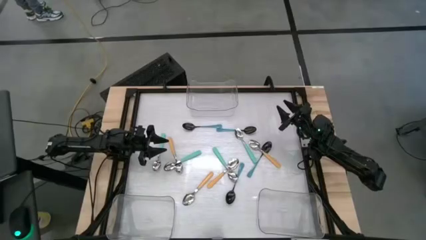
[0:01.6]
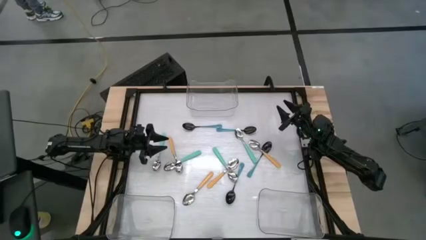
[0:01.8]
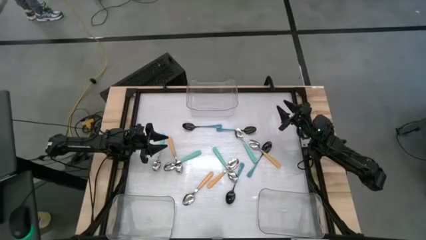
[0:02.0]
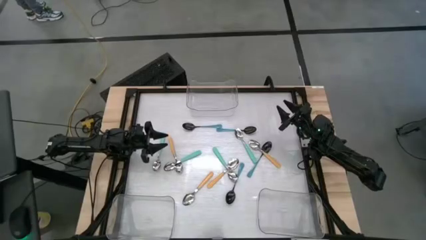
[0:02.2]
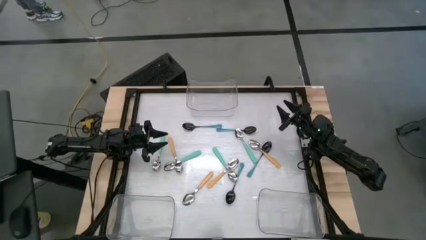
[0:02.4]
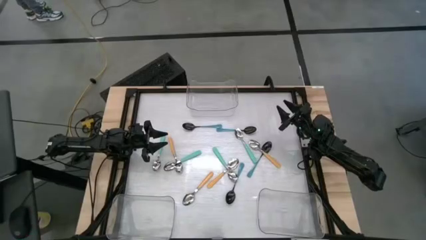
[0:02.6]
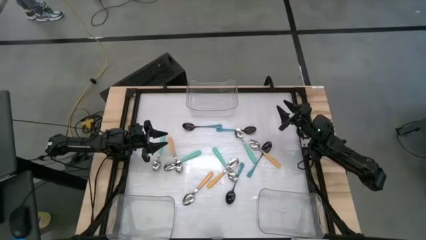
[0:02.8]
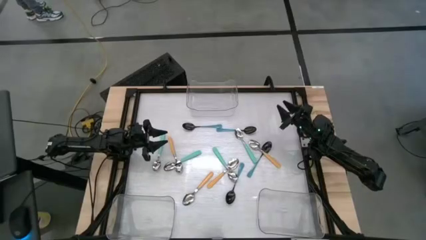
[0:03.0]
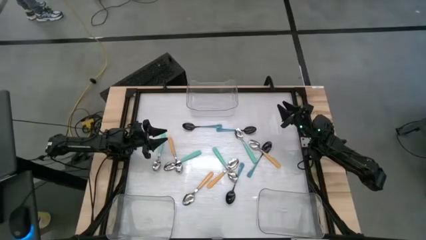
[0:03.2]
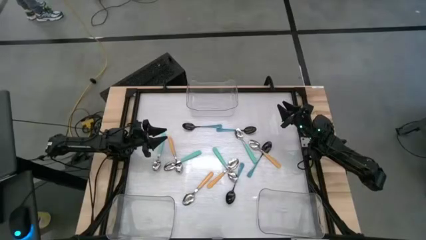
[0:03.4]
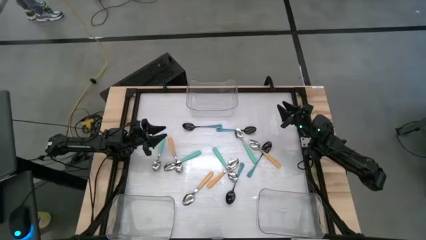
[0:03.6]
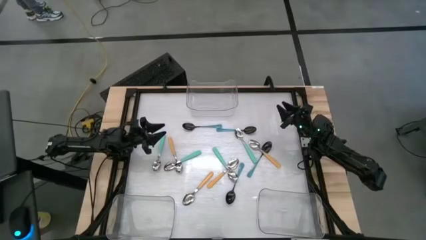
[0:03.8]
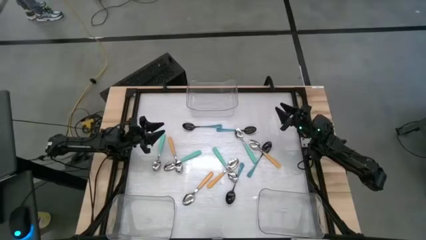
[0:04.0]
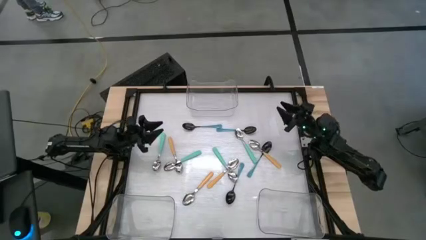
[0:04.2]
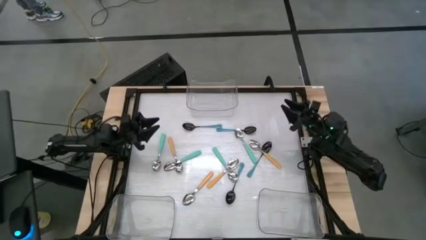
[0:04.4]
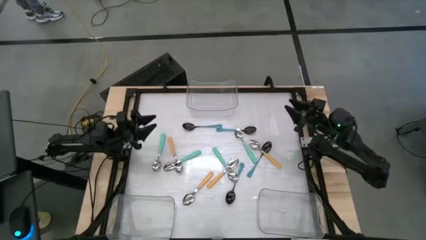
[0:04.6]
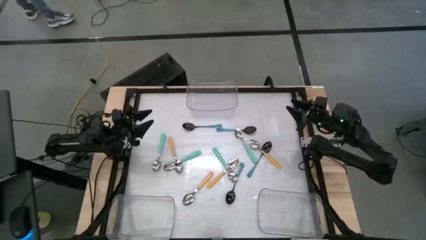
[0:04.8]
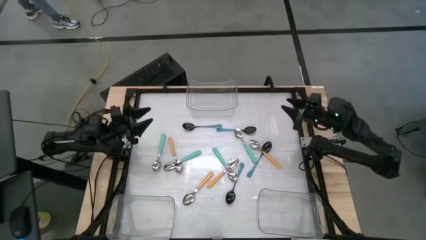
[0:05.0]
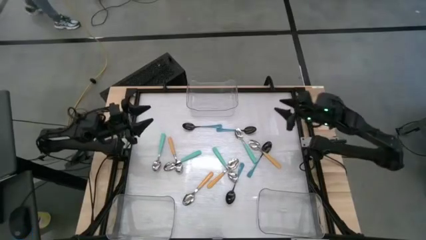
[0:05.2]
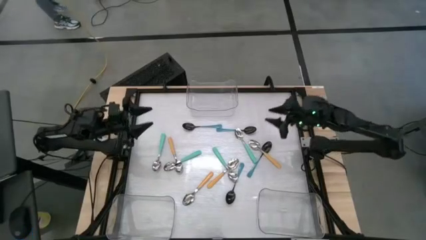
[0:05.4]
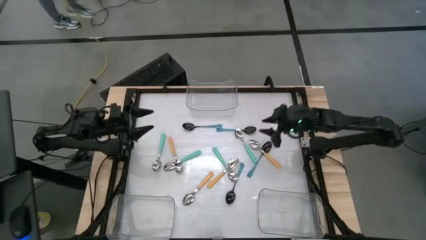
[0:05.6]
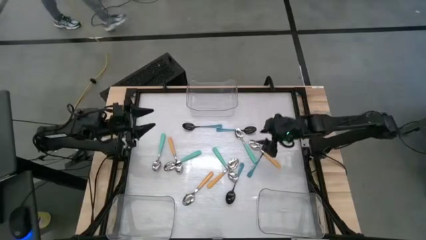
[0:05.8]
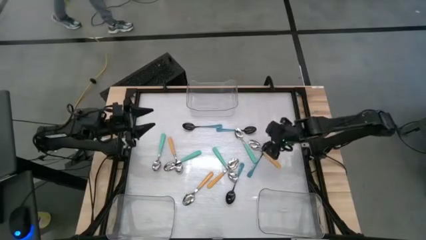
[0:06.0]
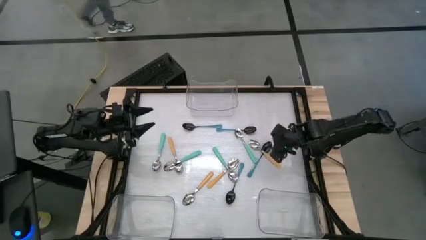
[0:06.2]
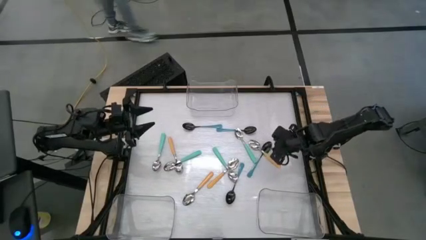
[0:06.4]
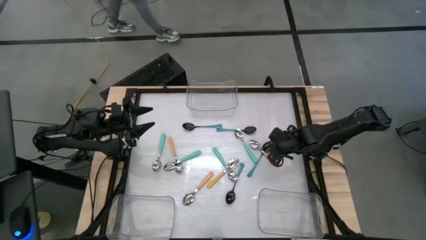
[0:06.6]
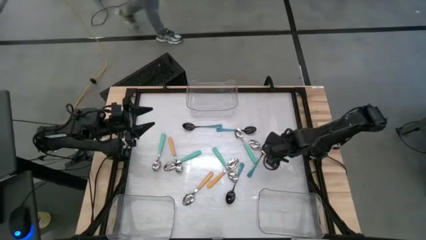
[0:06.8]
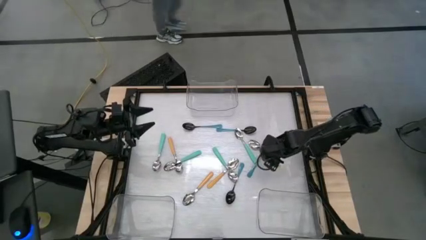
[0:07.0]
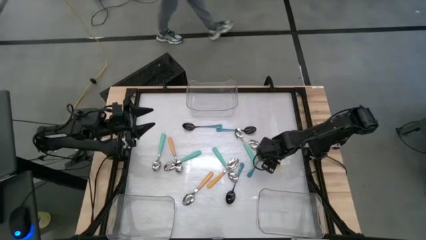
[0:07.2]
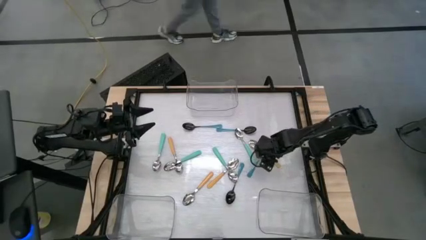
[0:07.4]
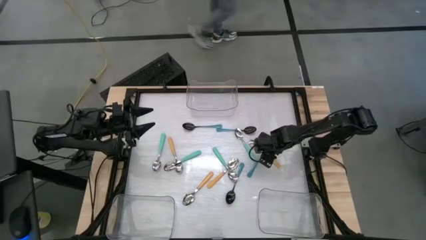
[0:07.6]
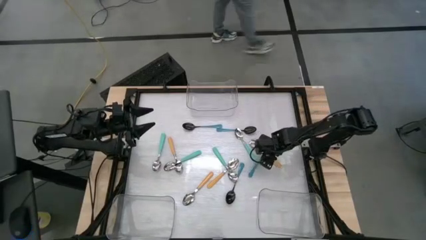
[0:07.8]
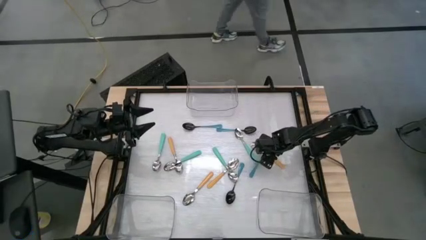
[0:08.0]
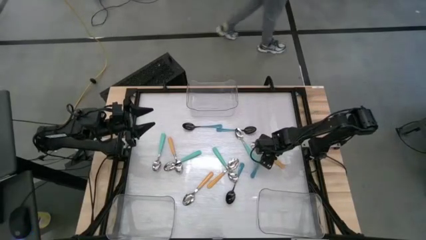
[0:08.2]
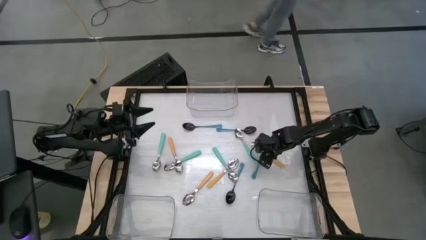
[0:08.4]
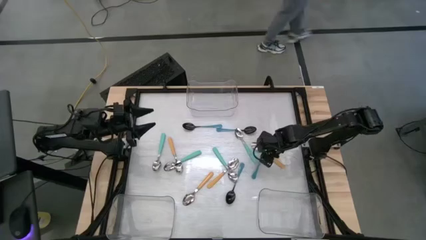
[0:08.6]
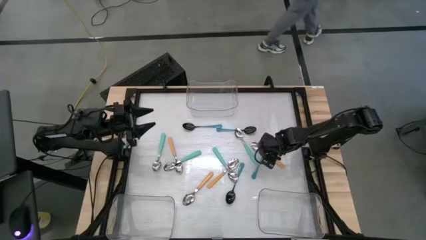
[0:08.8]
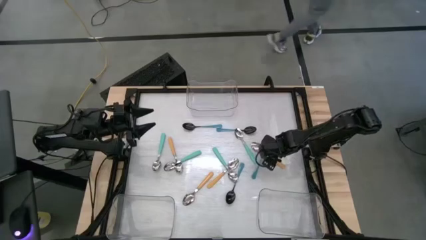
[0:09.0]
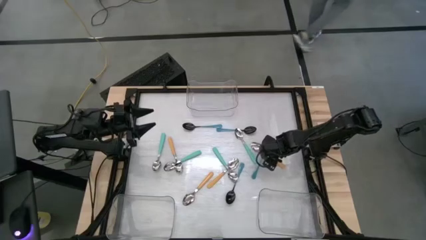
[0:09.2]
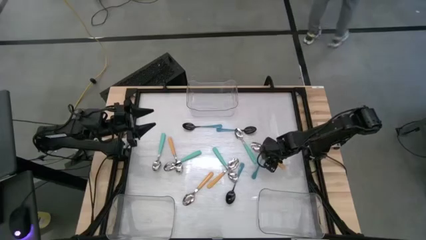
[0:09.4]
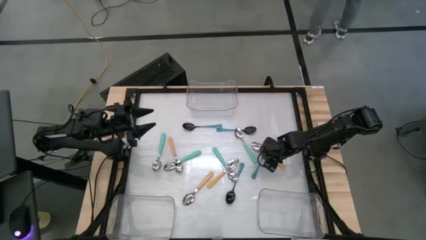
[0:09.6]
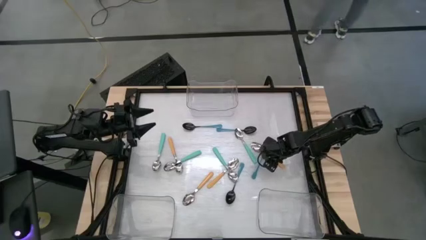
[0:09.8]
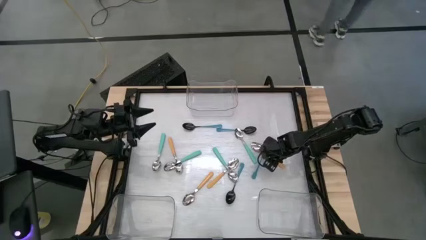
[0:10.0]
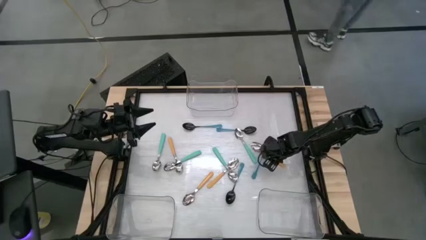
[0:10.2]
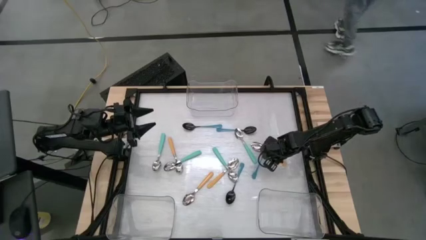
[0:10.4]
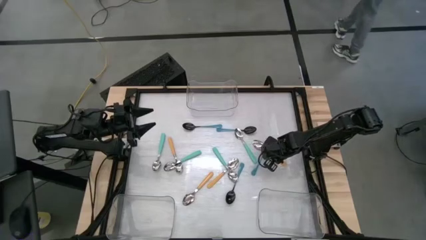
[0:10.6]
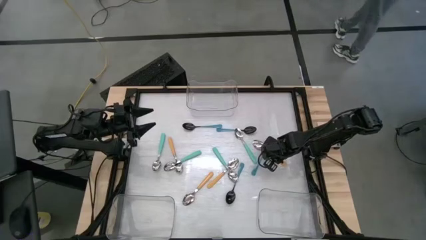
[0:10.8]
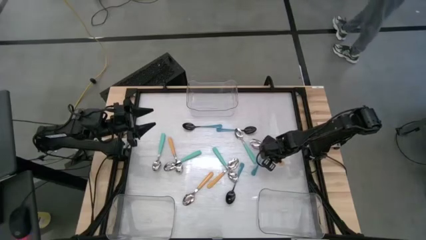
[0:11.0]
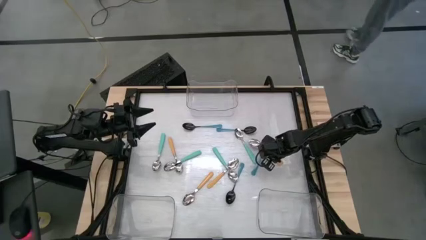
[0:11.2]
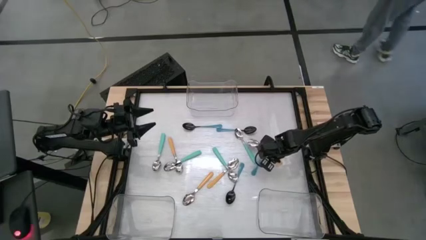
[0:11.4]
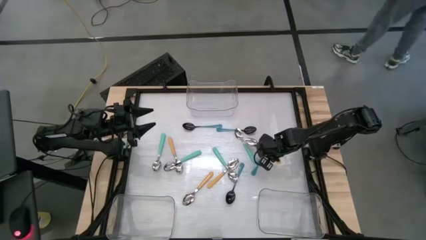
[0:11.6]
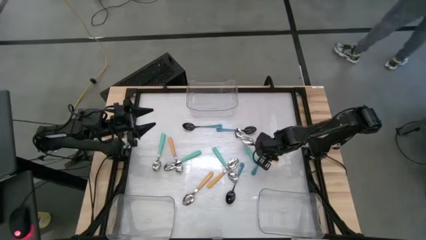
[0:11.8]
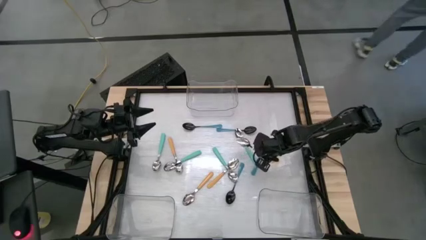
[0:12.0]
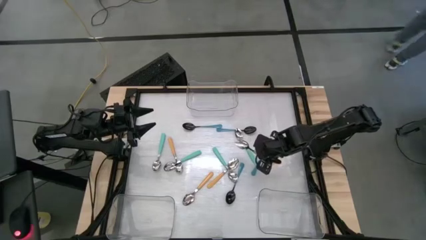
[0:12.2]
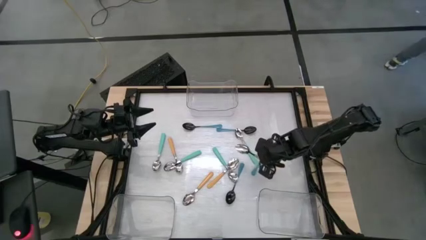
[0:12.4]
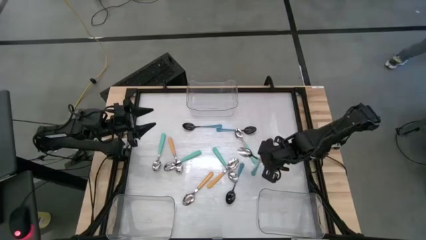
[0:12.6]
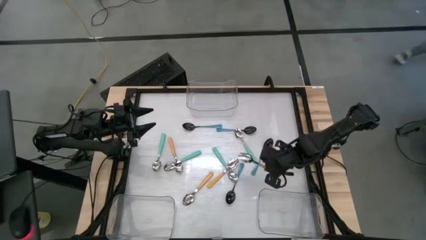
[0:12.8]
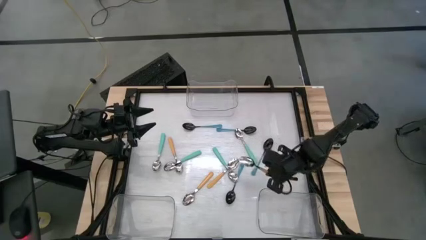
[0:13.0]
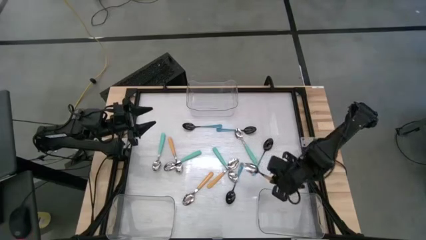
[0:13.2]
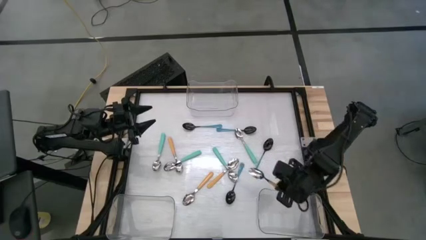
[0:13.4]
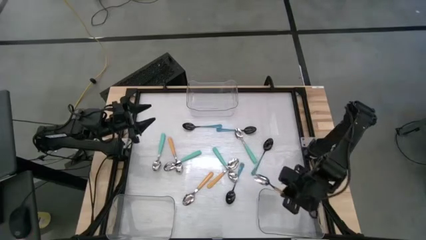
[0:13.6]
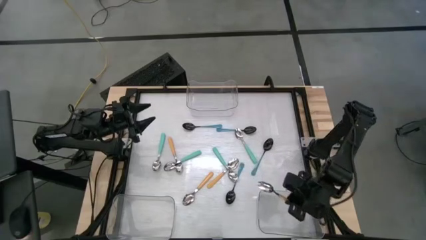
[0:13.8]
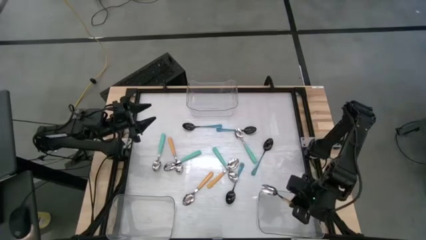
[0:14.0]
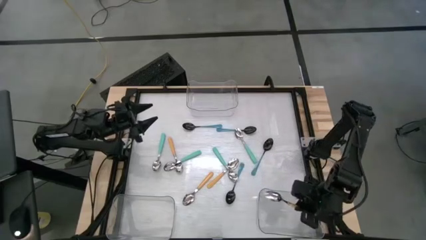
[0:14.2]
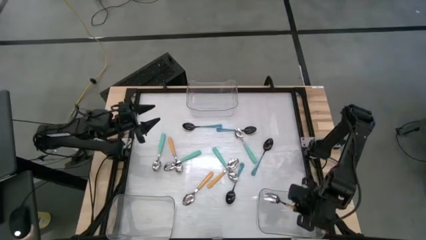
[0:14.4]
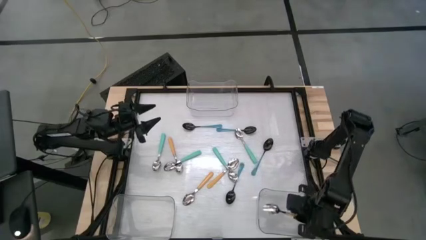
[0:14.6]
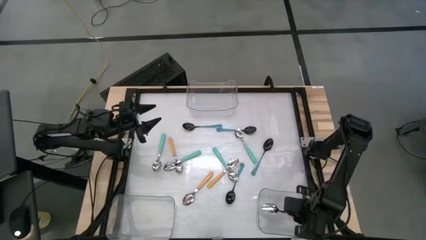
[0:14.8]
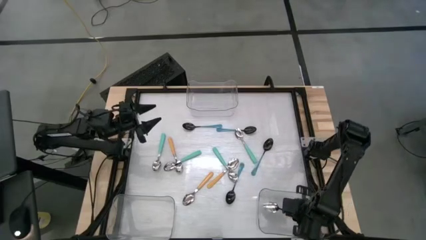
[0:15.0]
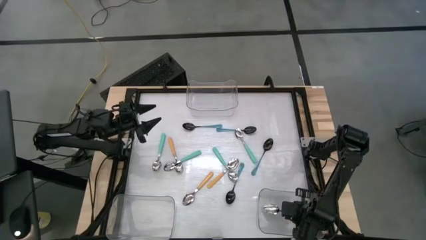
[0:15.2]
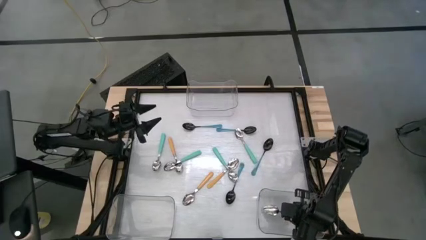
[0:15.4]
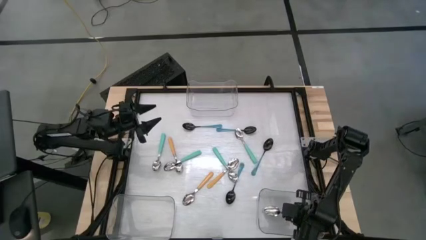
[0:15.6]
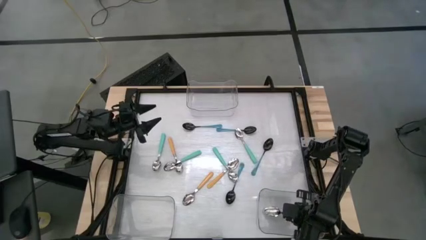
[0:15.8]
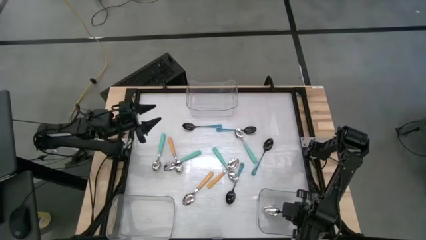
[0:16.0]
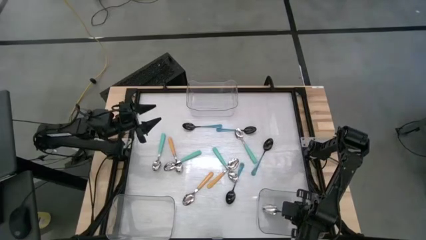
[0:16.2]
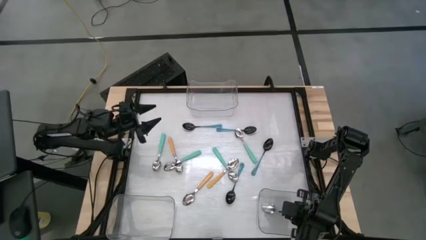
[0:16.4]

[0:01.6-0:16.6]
Task: Sort silverware by color (type)
Put the right orange spoon into the bottom right transparent bin
